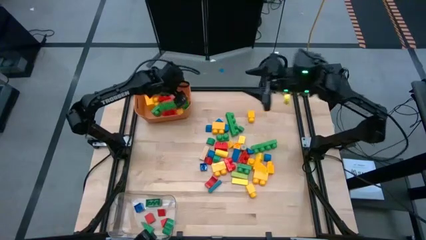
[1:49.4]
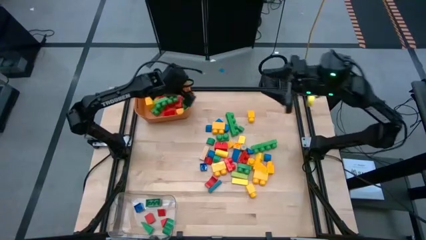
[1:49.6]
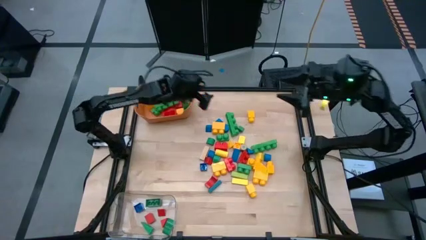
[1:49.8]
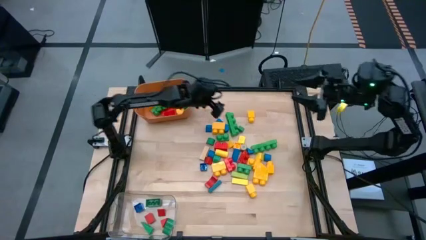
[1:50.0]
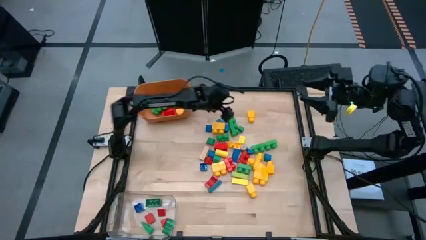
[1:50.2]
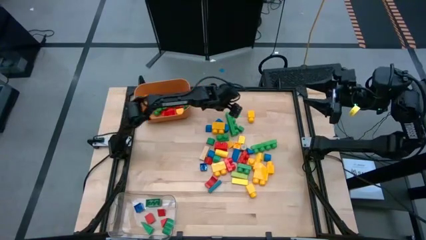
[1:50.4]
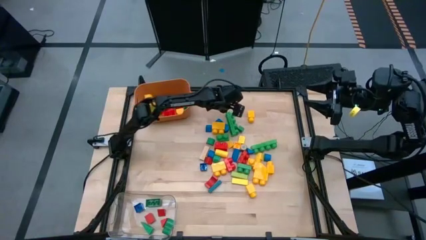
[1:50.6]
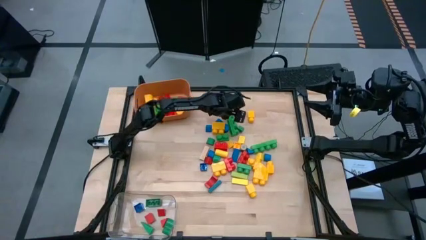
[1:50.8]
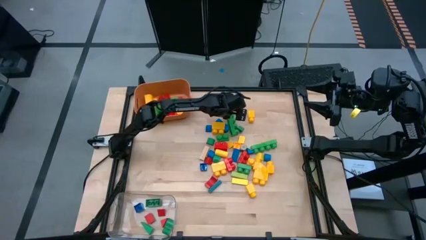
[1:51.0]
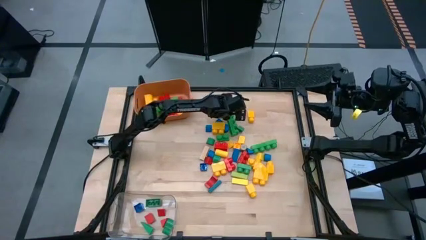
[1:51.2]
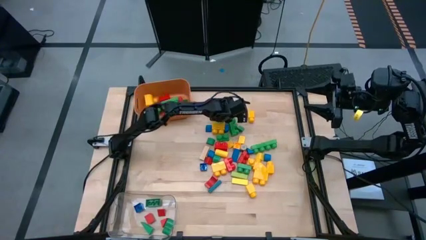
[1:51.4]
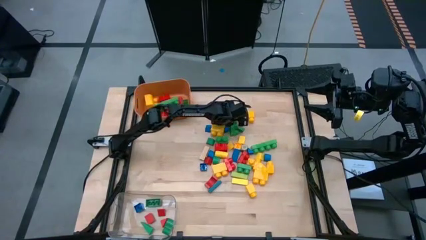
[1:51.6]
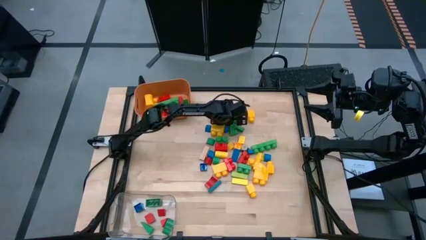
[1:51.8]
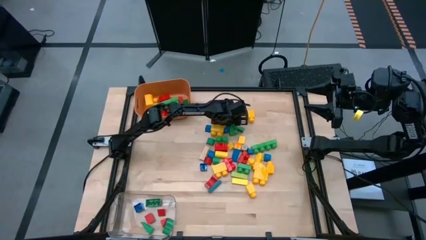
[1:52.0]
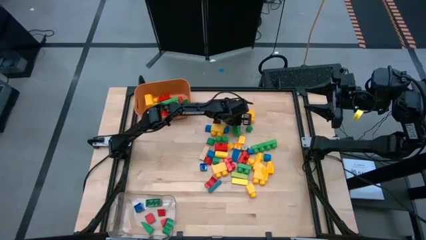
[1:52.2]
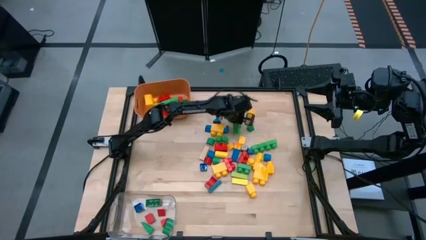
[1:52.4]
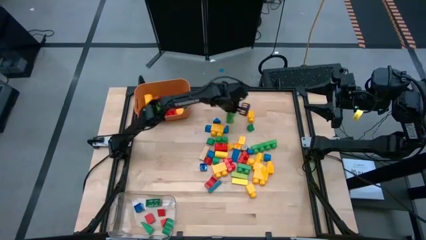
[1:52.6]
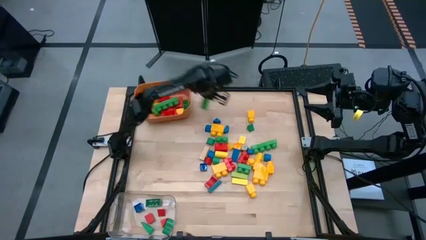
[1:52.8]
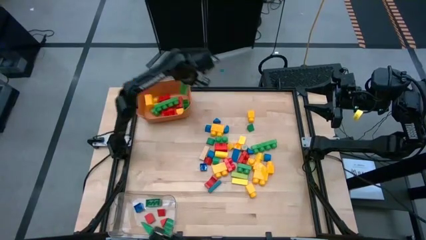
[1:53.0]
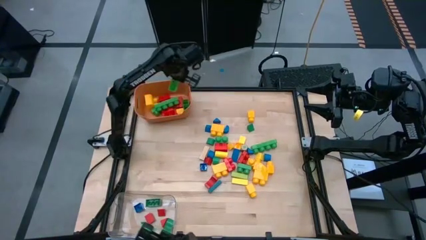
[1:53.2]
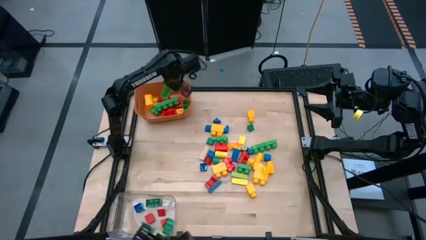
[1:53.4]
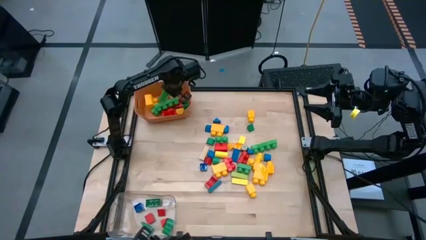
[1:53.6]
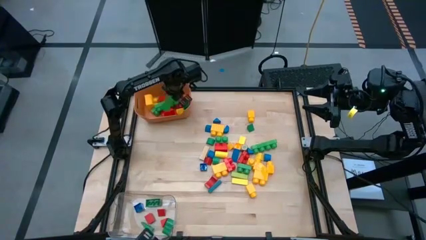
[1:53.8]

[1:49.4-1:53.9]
Task: Sort blocks by size
Put the big green game piece into the orange bin

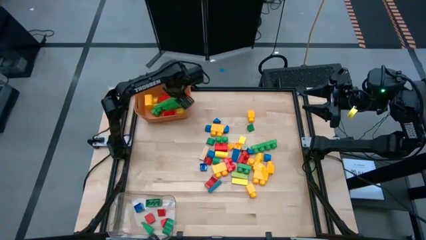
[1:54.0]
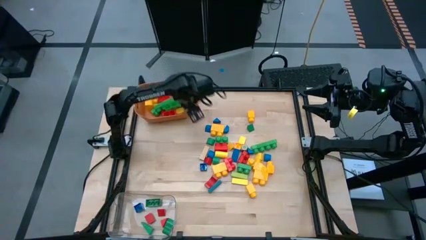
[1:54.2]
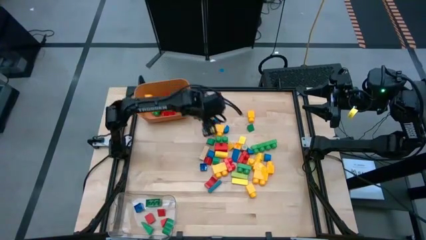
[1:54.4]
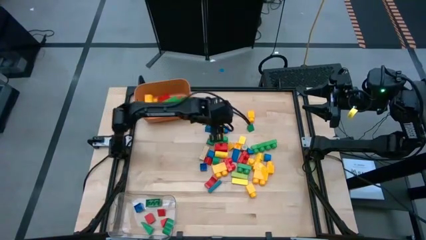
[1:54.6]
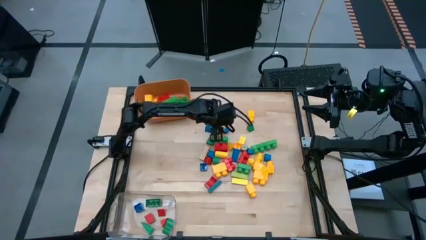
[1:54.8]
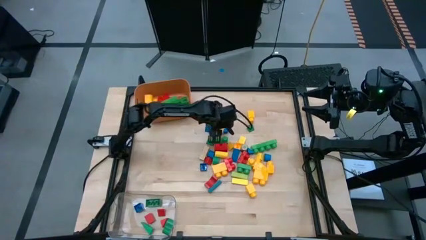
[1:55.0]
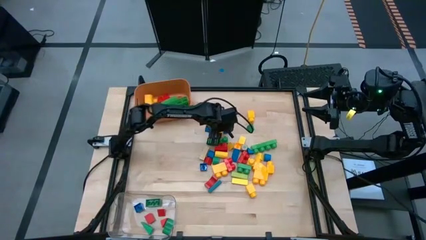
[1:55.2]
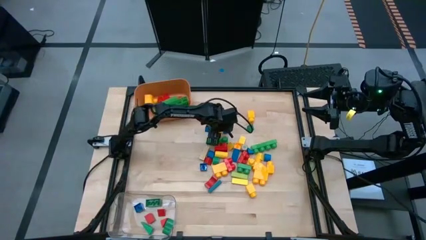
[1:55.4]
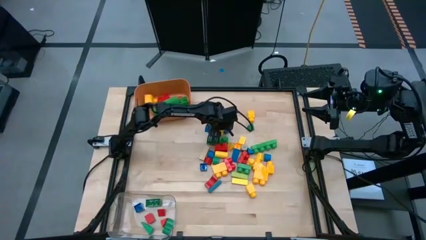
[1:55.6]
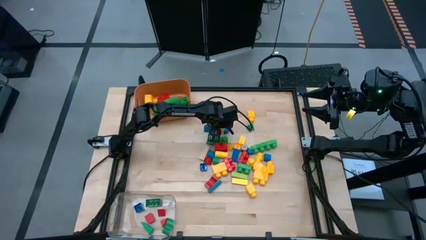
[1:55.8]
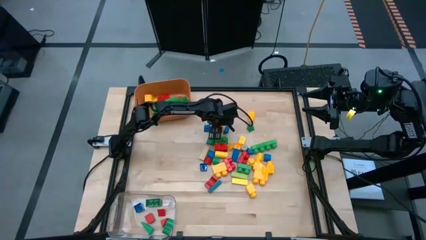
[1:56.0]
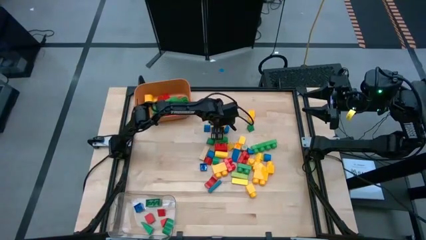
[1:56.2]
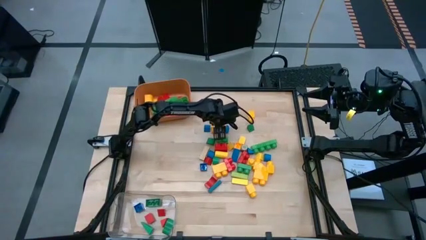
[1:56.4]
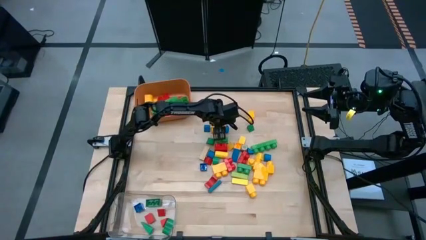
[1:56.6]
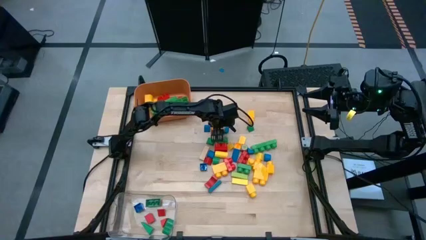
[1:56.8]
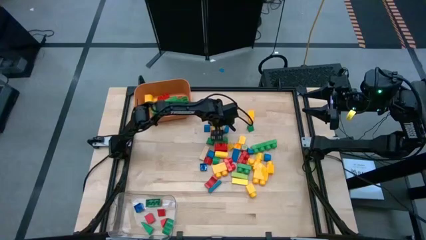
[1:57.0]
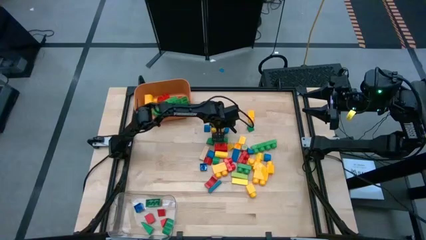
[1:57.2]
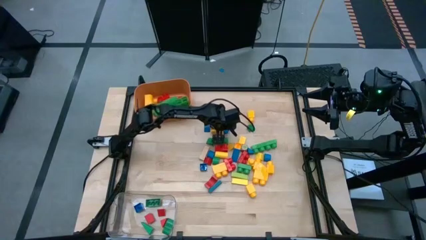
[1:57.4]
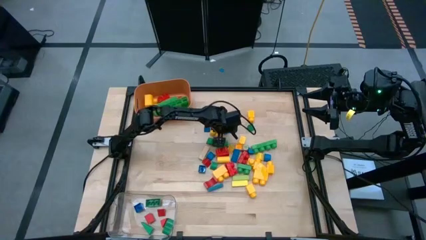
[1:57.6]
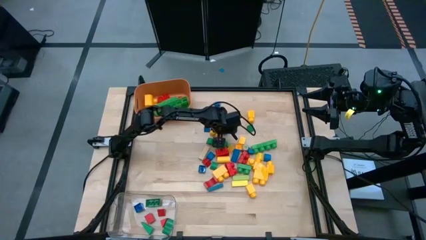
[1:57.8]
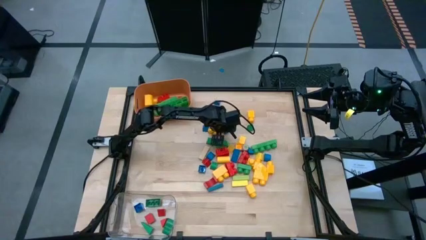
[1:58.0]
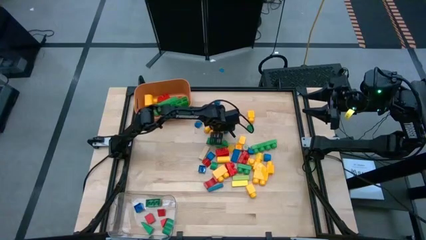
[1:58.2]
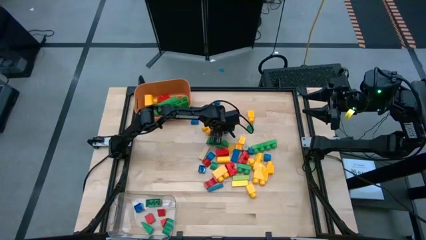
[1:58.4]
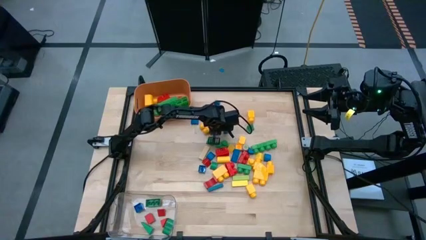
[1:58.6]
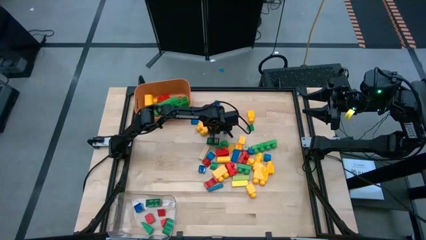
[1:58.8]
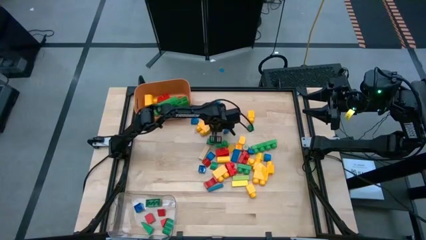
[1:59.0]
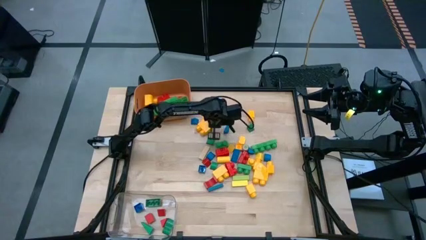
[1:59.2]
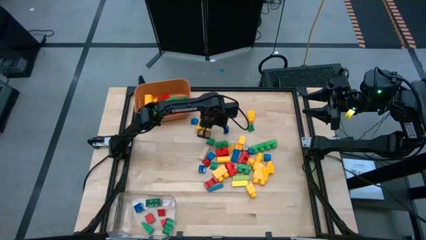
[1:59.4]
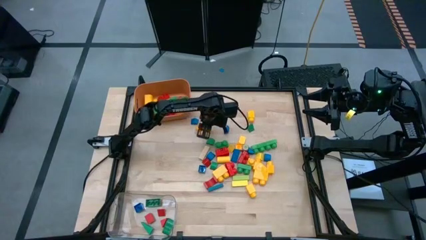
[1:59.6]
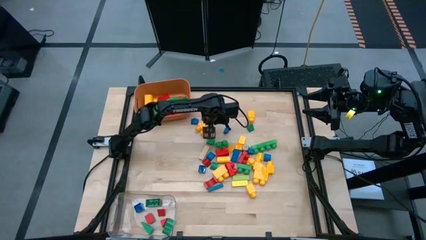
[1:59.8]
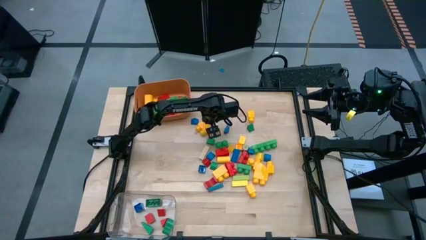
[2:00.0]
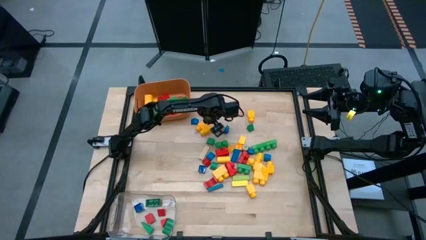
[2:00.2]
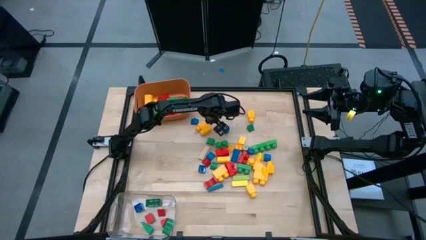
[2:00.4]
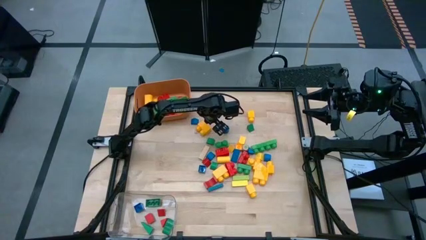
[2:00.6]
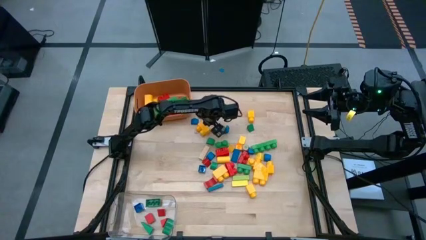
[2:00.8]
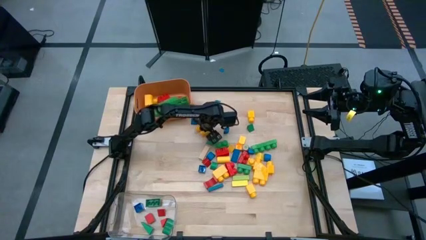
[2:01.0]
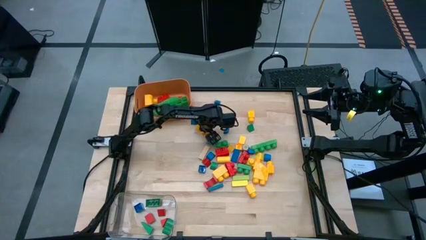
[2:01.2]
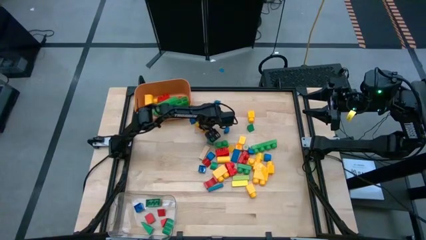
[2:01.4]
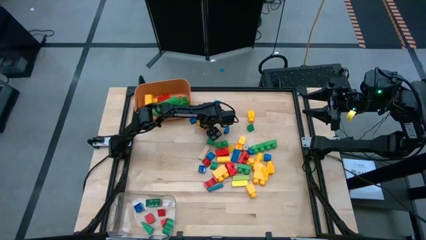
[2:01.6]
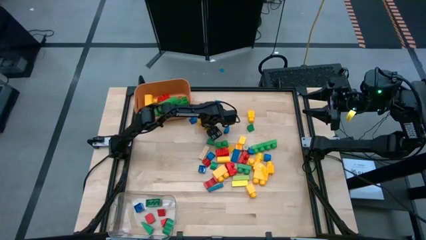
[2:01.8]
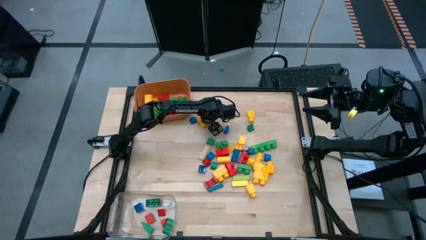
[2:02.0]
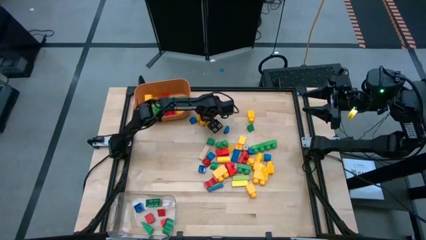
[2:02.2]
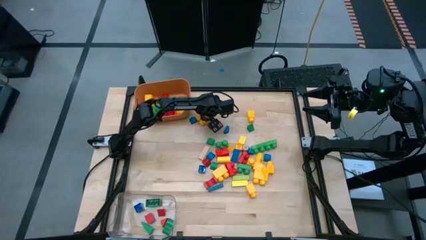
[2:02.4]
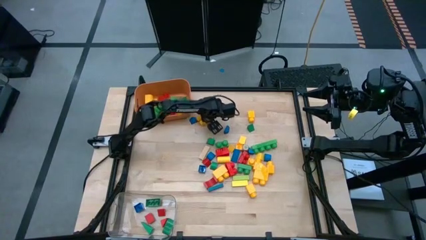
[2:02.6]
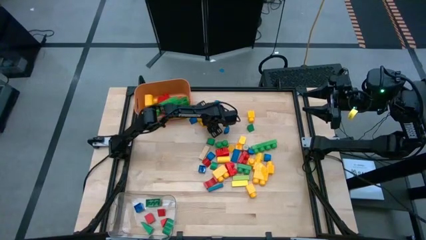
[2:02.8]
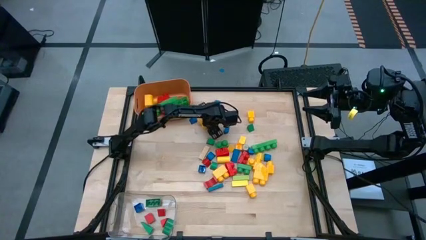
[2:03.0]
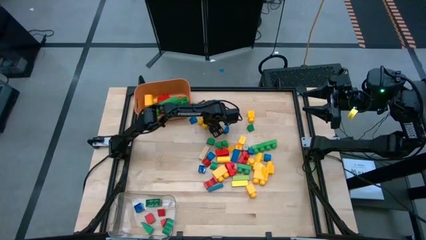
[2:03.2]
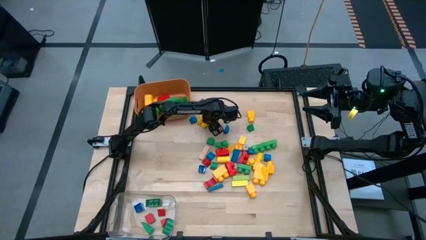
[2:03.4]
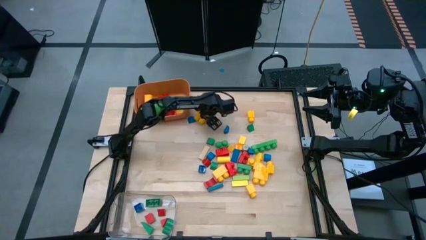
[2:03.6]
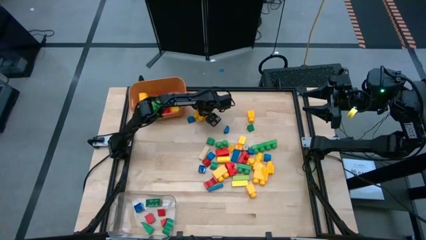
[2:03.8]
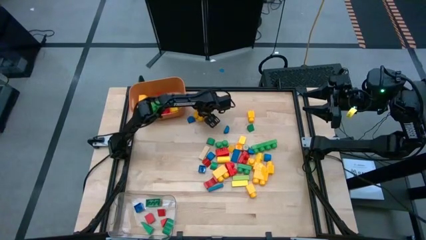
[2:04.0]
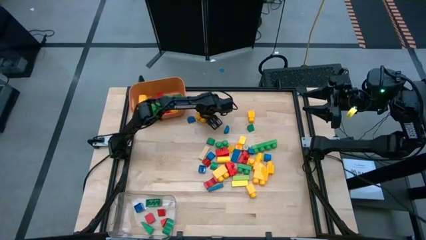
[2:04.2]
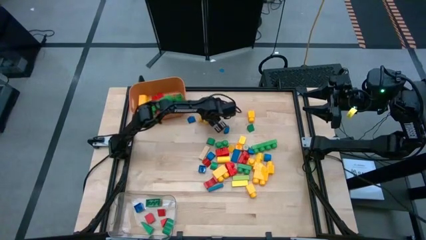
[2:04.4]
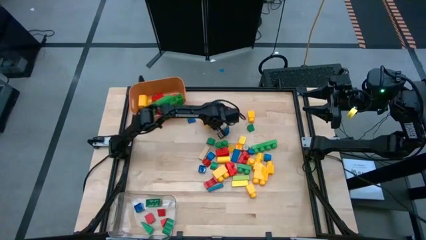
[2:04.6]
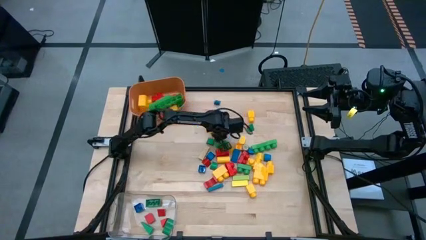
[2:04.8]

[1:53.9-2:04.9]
Put the big yellow game piece into the orange bin

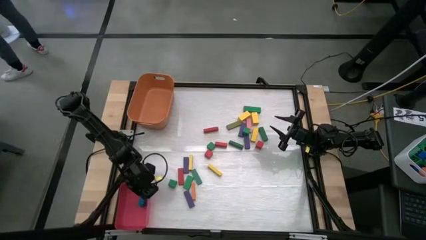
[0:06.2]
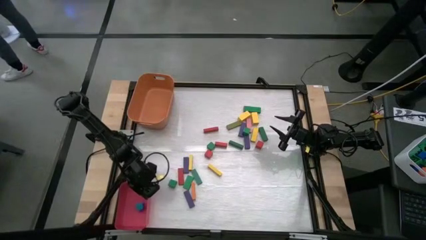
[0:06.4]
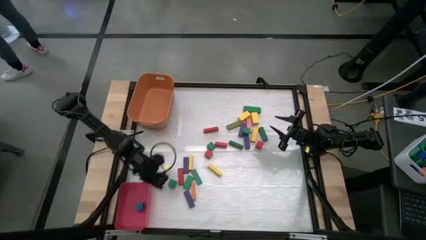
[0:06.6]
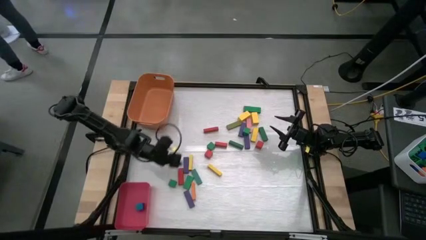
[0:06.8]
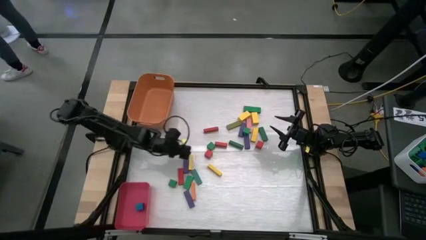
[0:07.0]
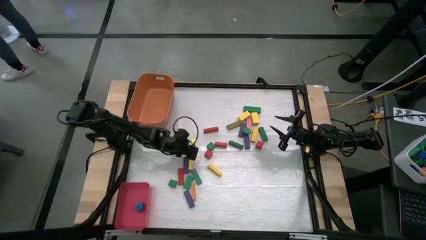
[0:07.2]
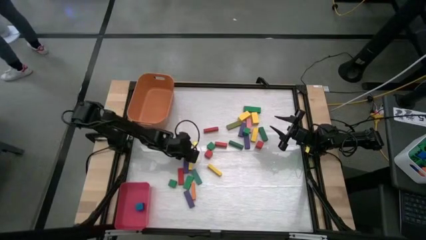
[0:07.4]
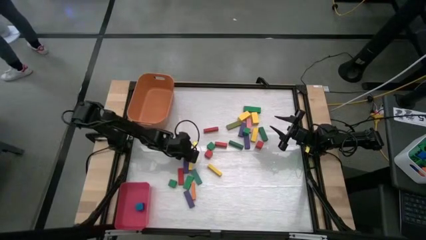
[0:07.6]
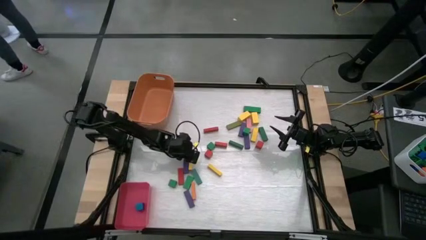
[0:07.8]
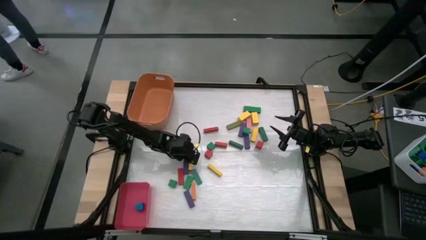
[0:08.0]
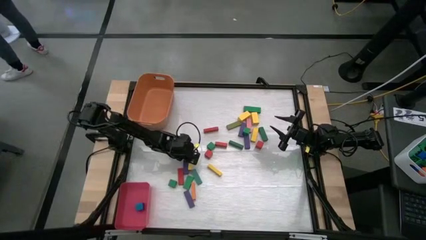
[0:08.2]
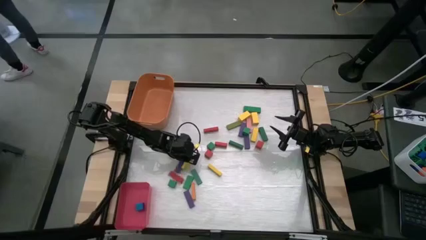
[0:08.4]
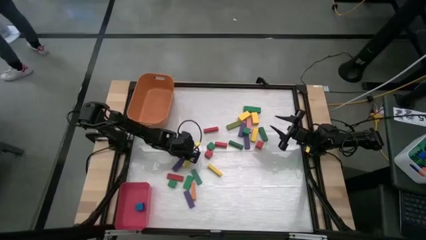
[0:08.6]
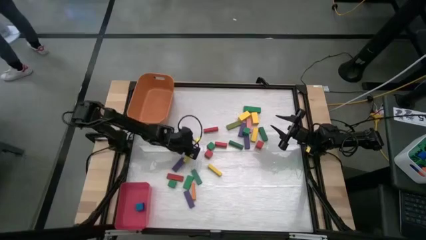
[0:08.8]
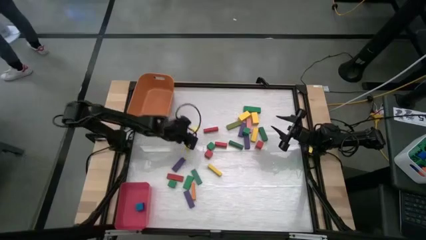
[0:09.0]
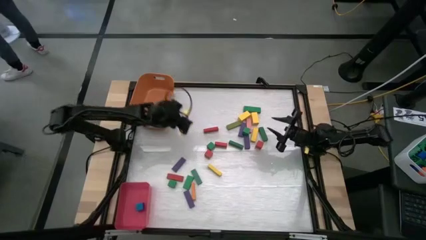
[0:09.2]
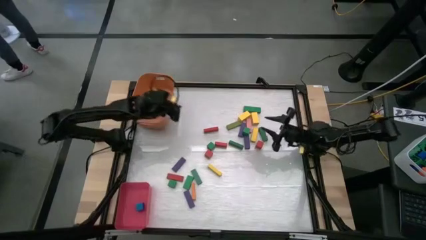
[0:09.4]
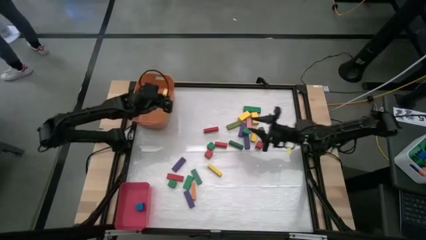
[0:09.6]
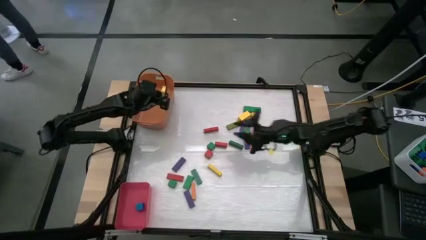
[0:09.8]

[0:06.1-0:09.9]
Task: Sort blocks by size
Put the big yellow block into the orange bin
